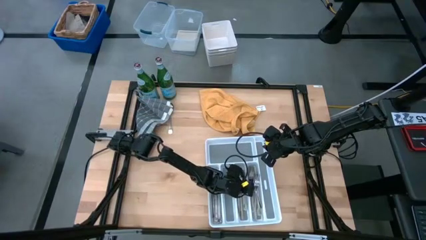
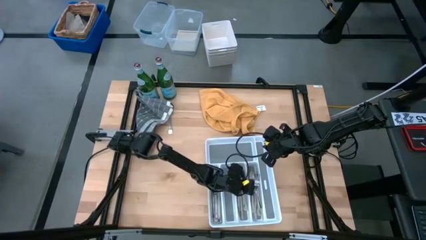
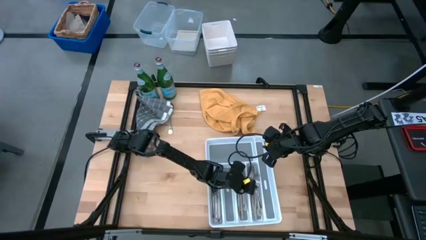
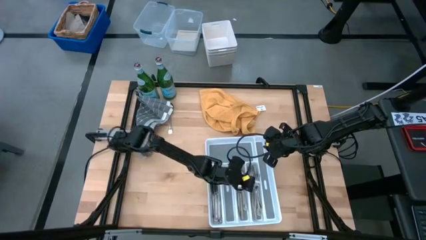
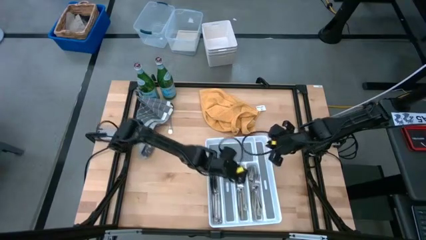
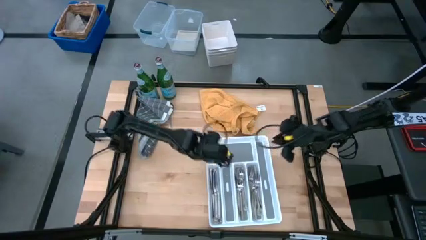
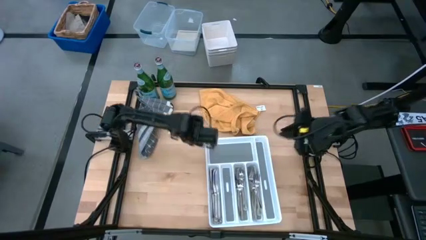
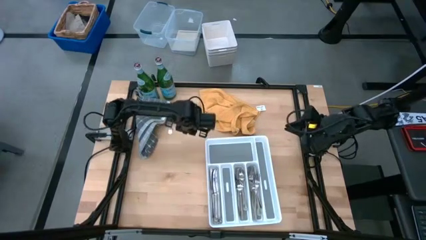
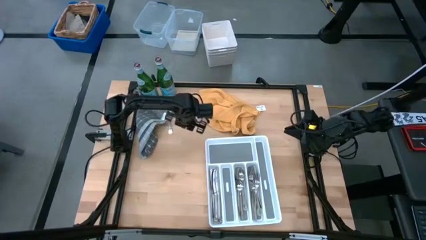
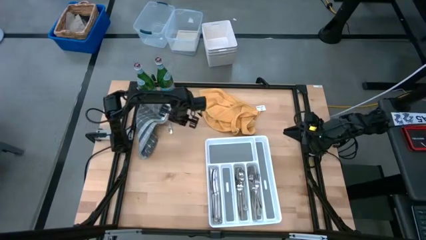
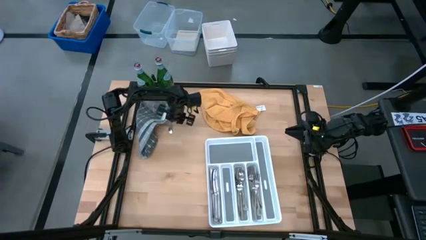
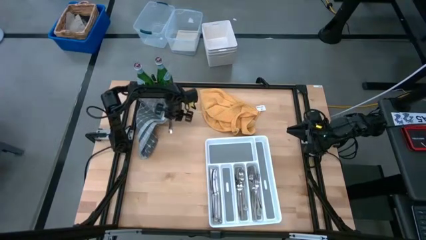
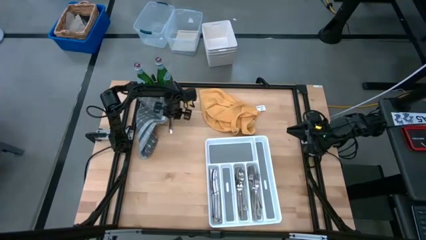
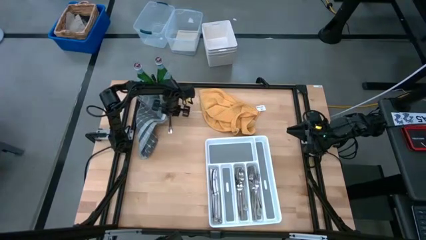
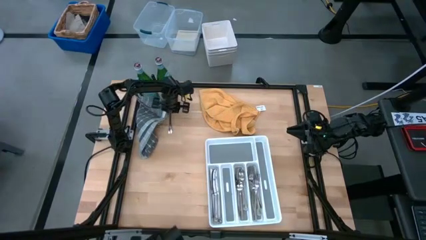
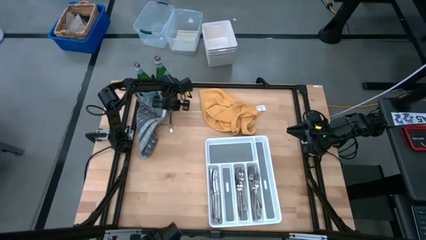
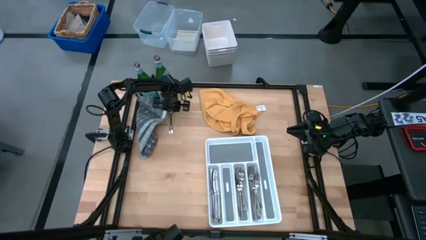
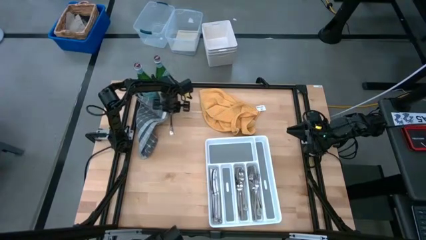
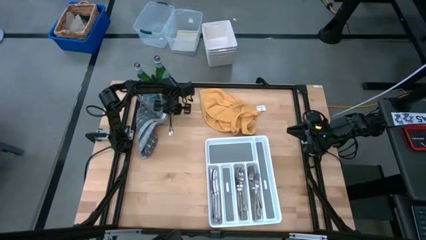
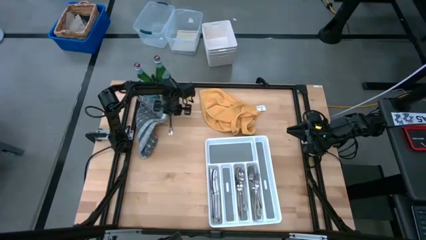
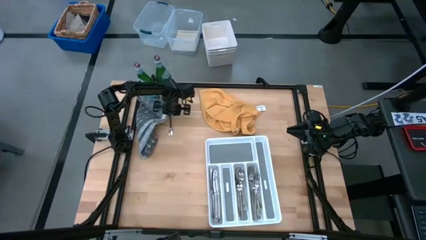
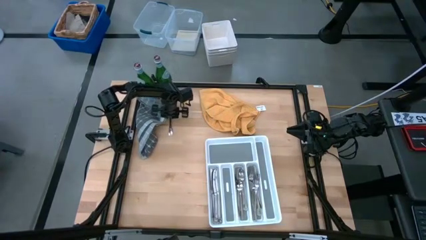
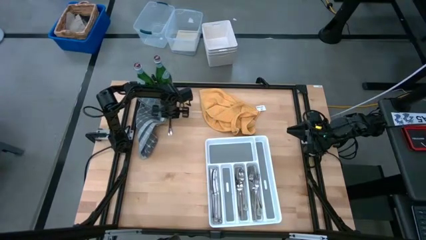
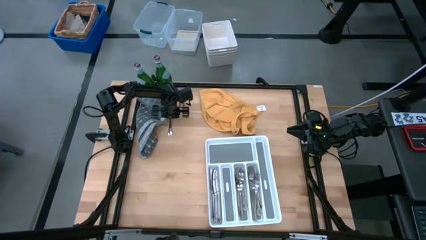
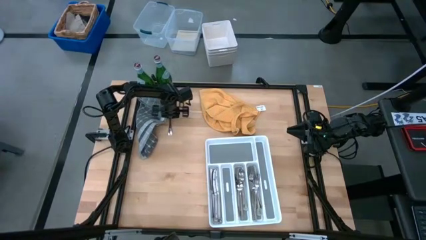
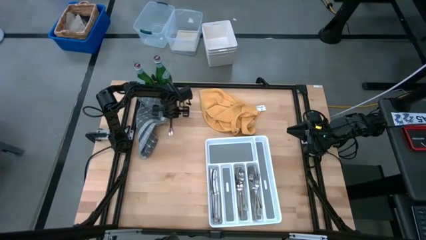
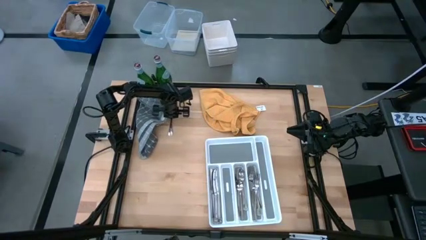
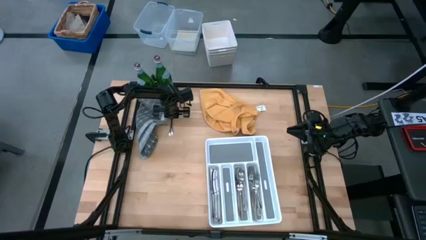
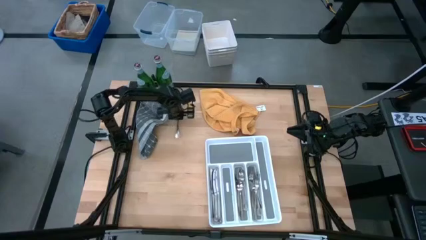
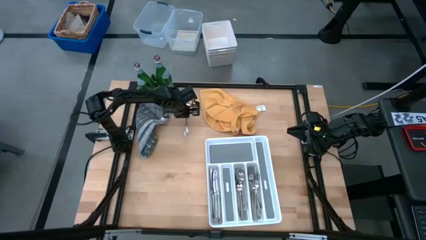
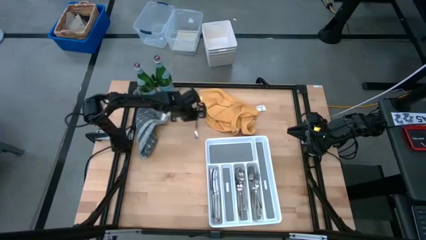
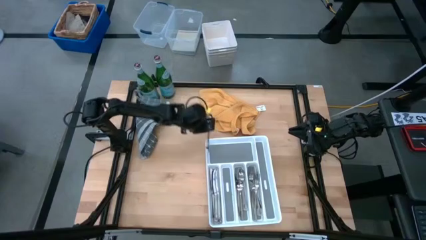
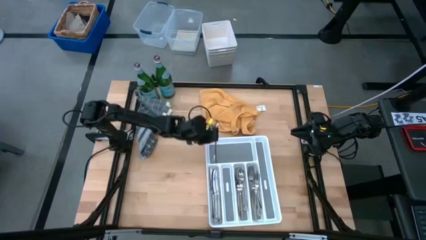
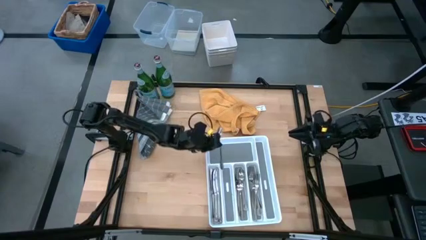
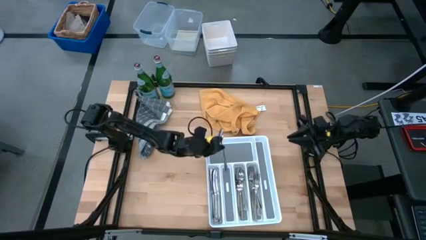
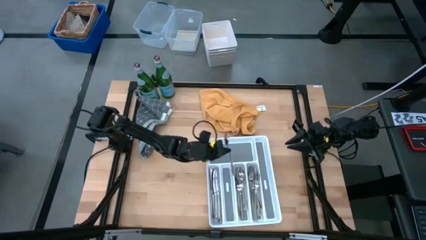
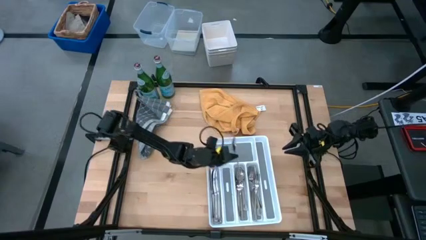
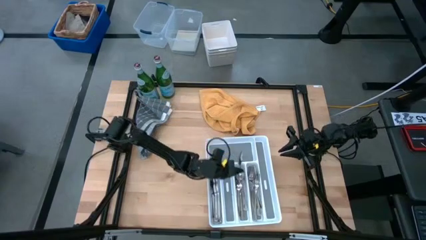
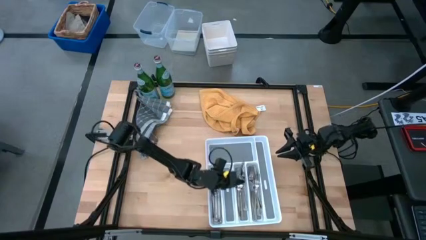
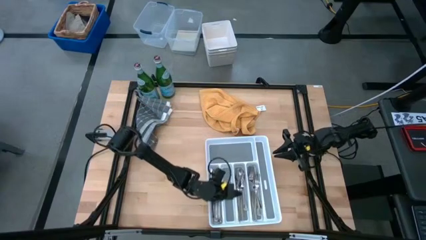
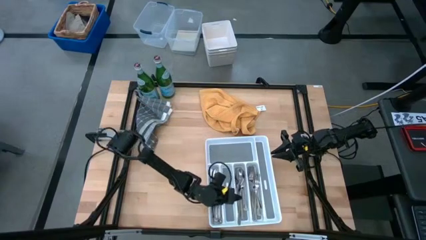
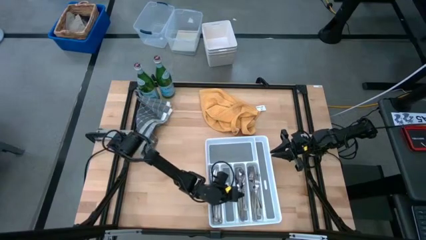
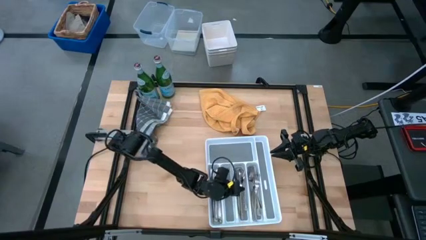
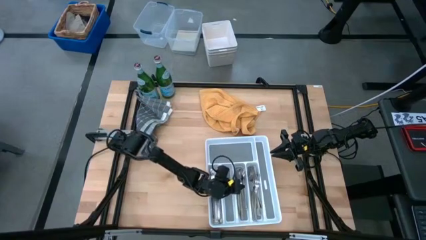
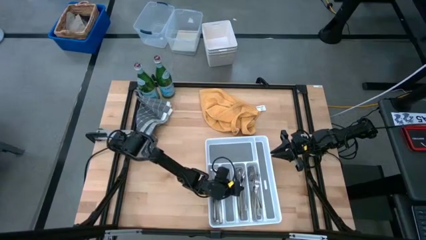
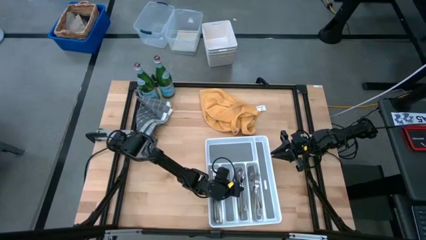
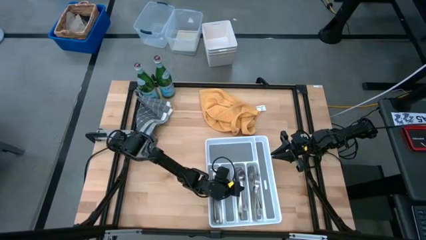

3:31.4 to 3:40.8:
Task: Sort silverware
Put the spoon into the silverware tray

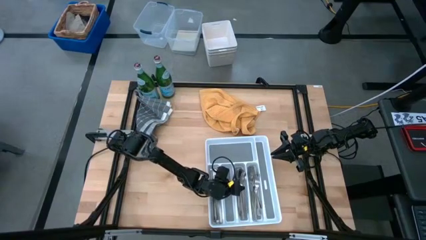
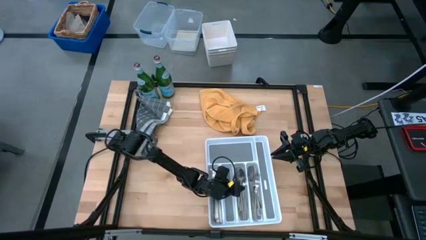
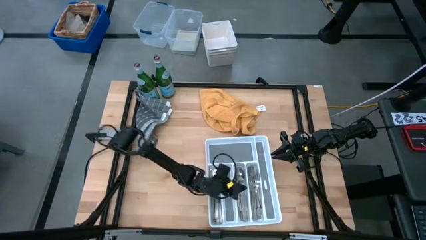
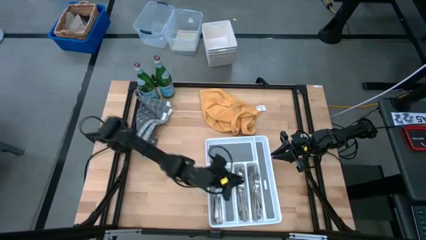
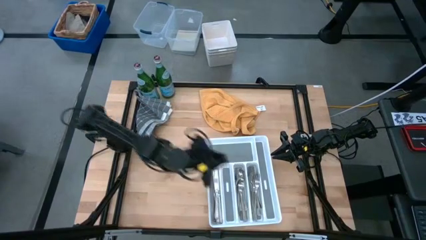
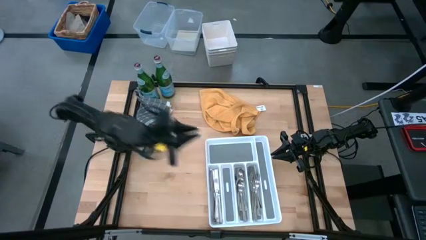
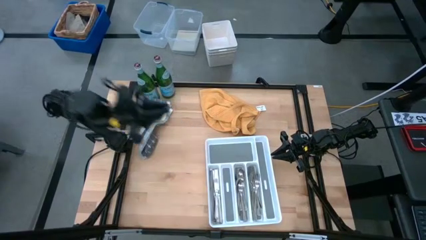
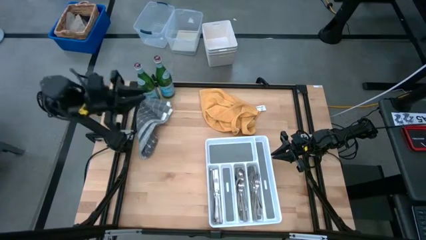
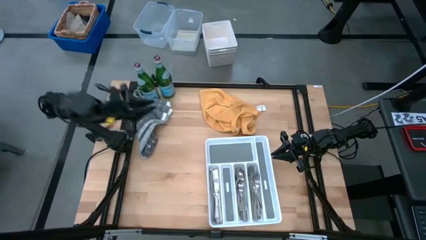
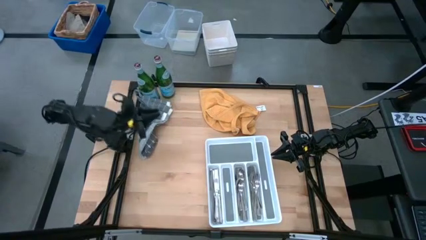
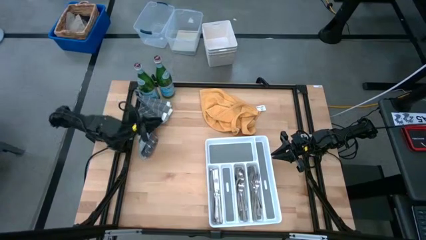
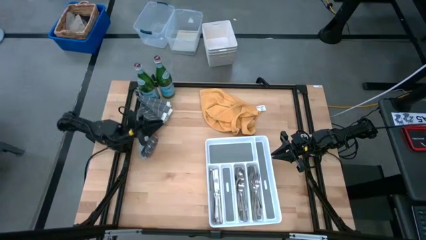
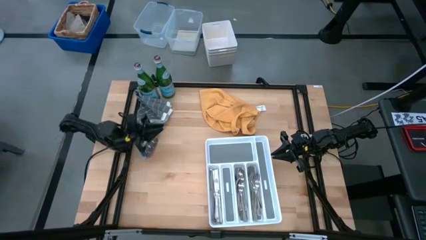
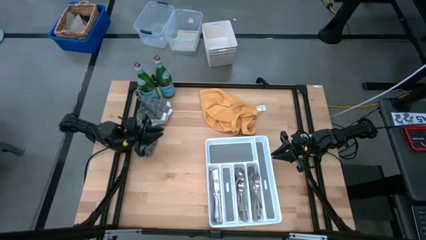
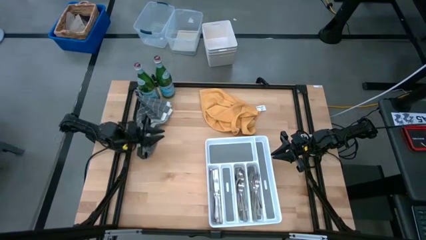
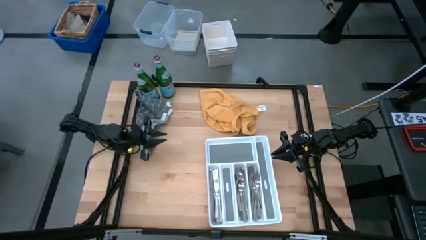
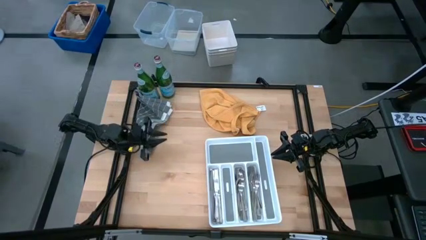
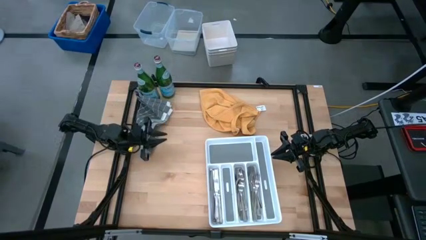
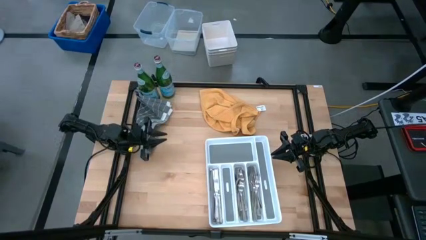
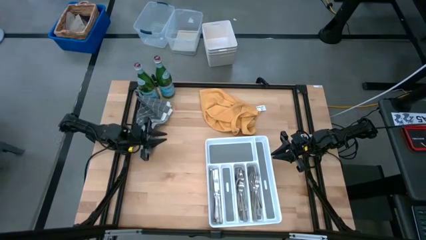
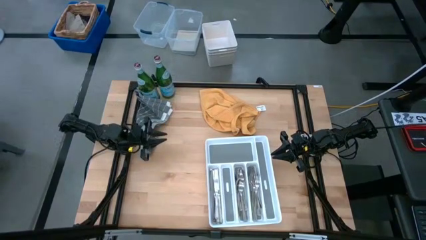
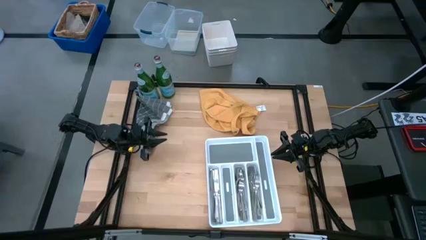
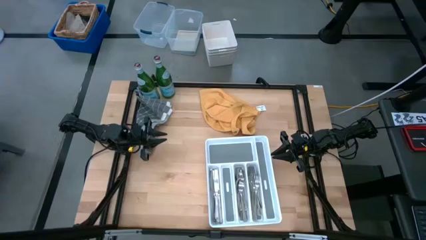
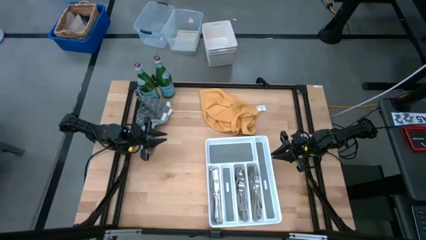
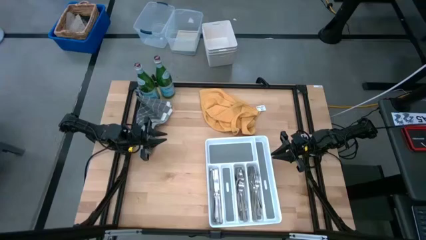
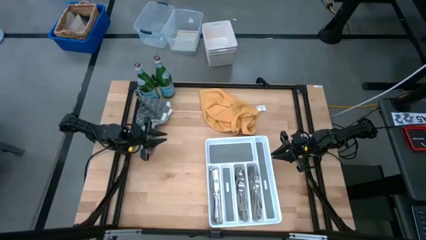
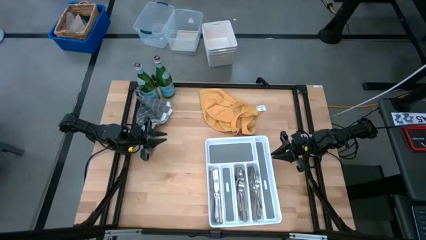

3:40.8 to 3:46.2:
Return to Home Position
